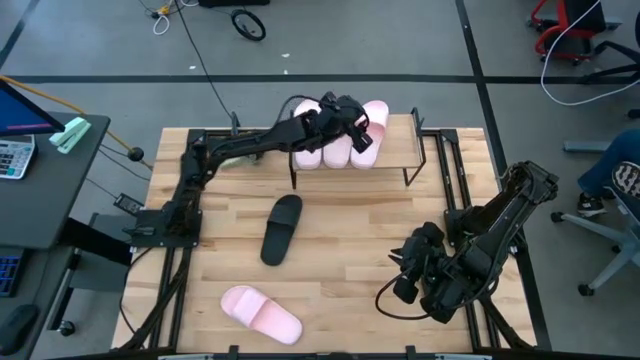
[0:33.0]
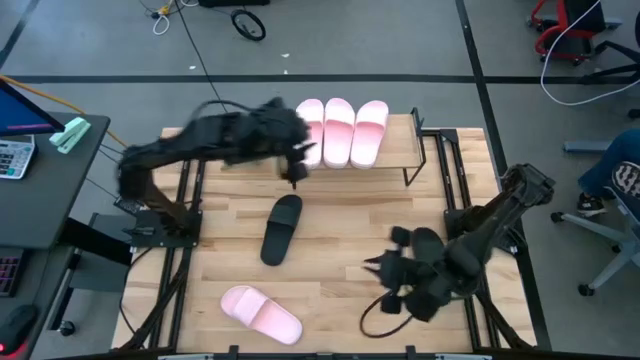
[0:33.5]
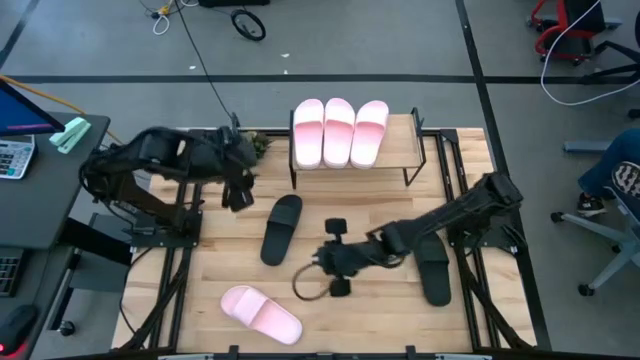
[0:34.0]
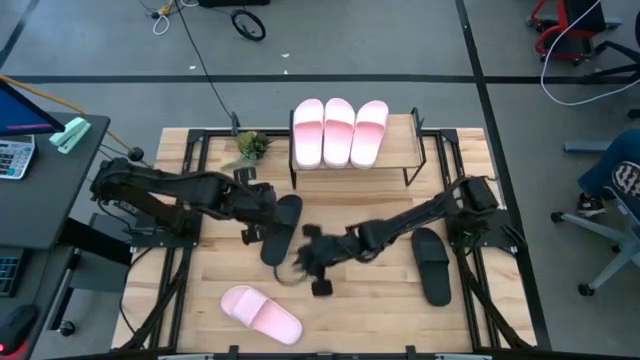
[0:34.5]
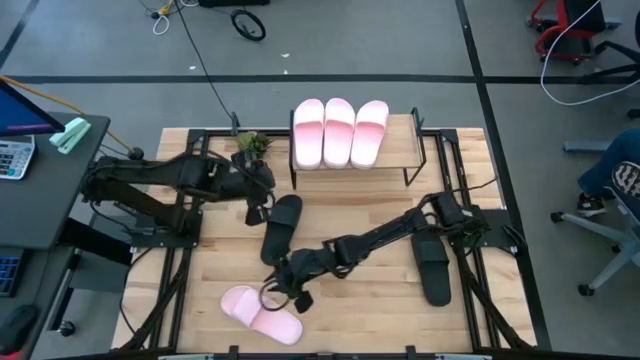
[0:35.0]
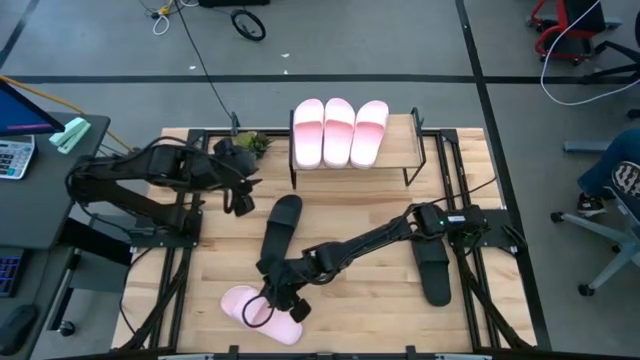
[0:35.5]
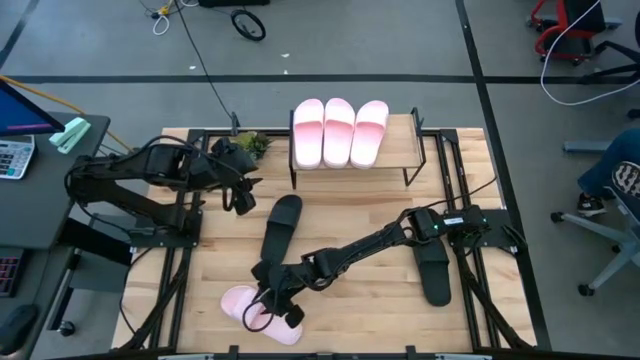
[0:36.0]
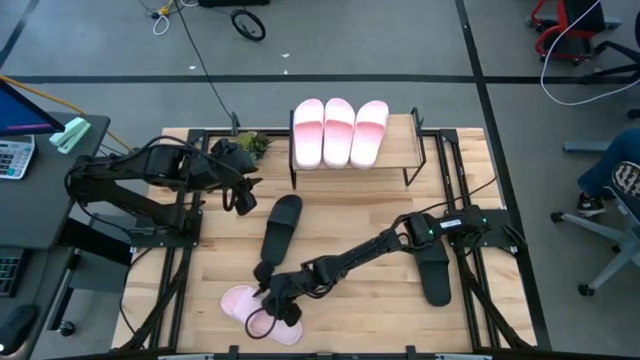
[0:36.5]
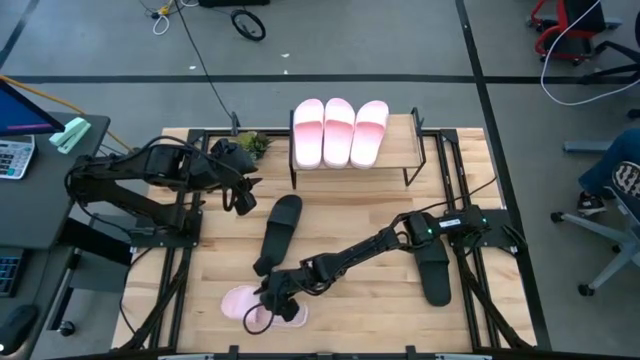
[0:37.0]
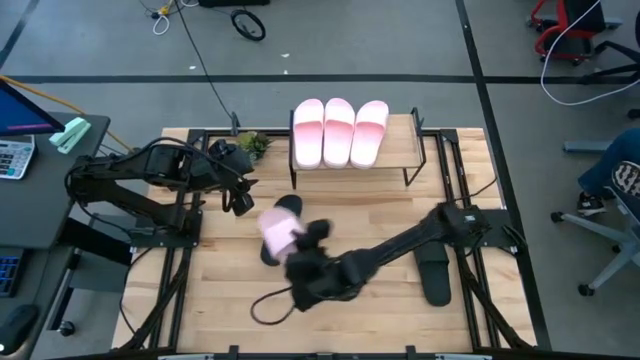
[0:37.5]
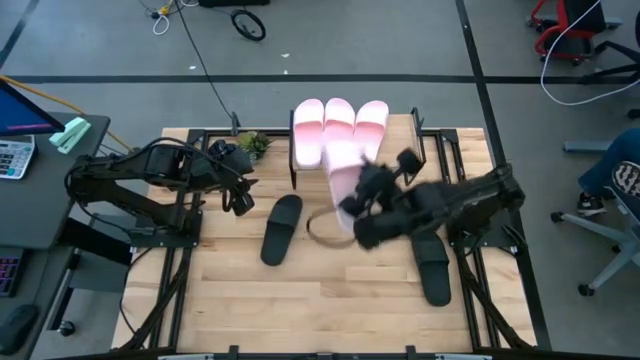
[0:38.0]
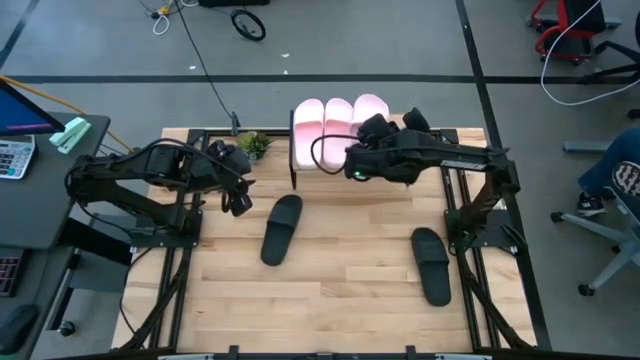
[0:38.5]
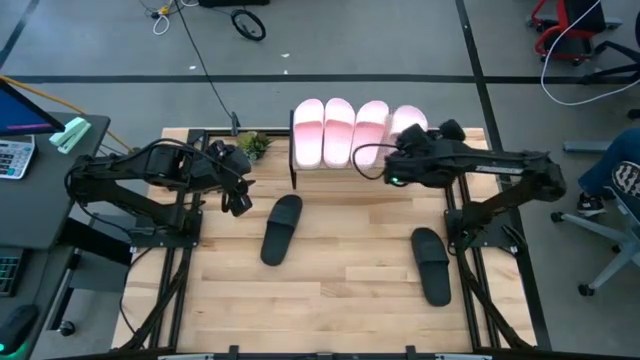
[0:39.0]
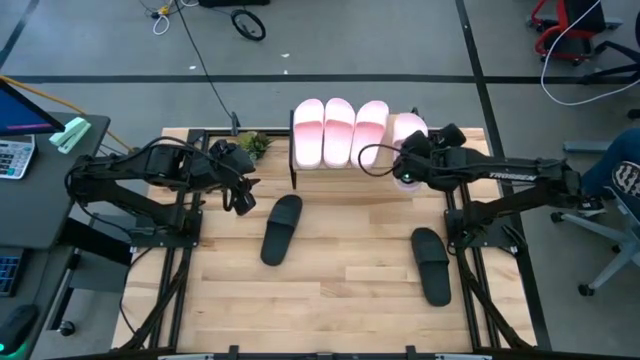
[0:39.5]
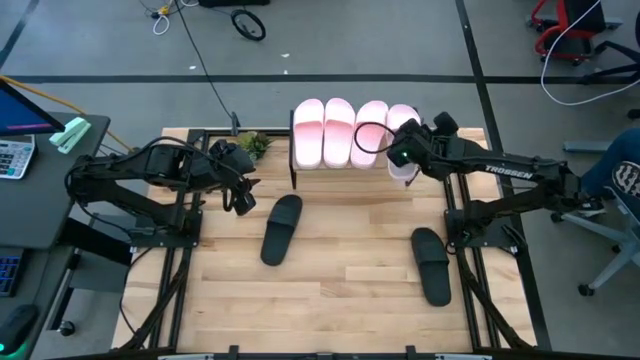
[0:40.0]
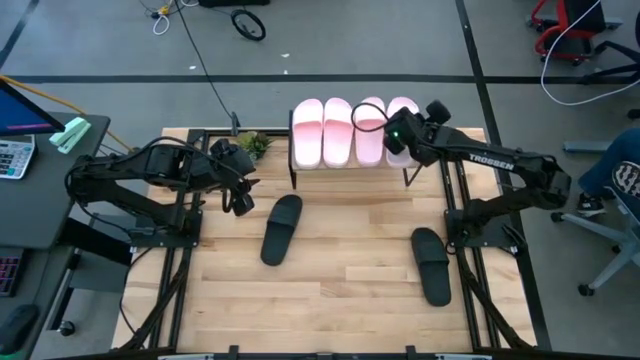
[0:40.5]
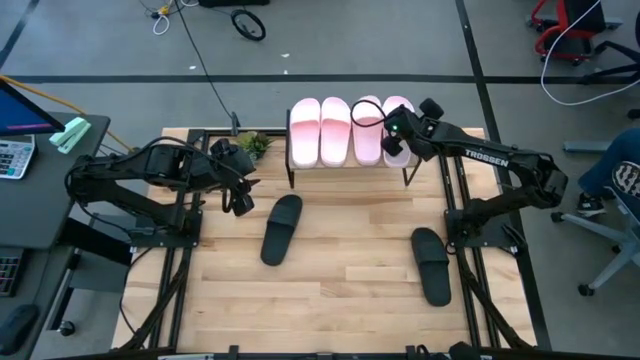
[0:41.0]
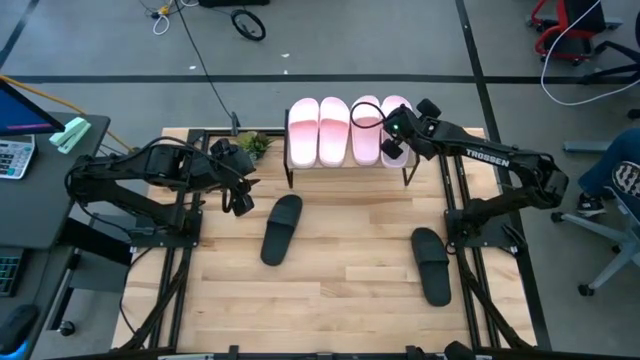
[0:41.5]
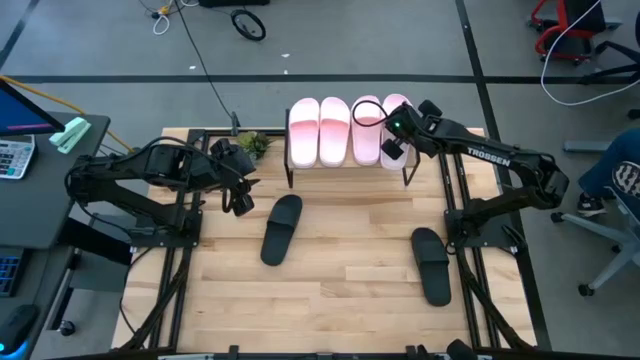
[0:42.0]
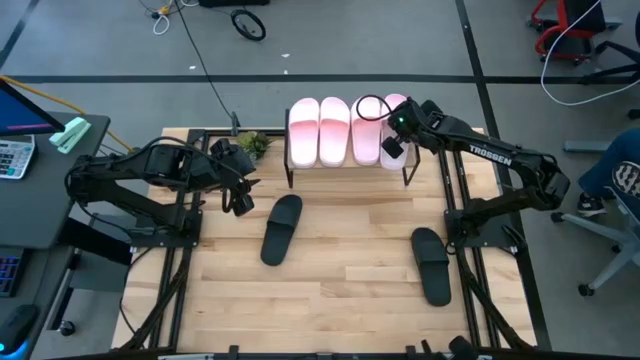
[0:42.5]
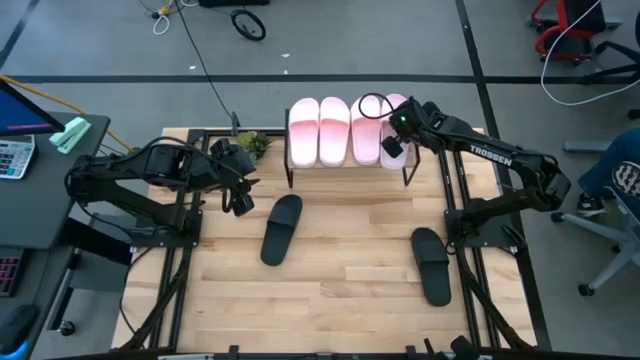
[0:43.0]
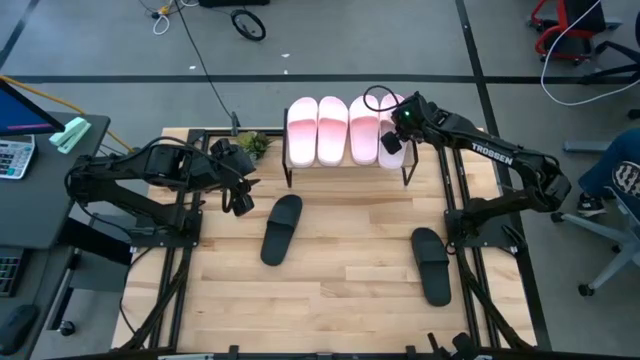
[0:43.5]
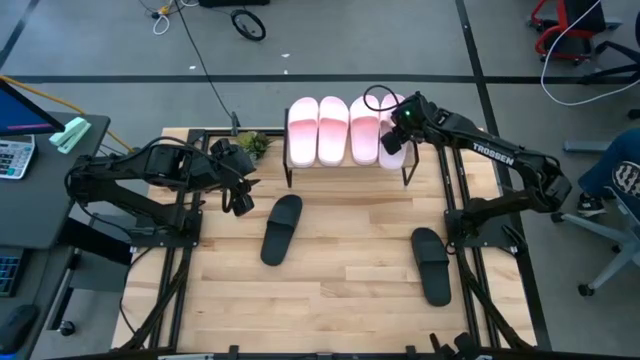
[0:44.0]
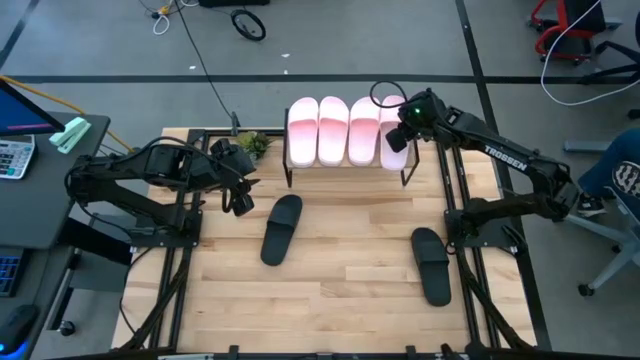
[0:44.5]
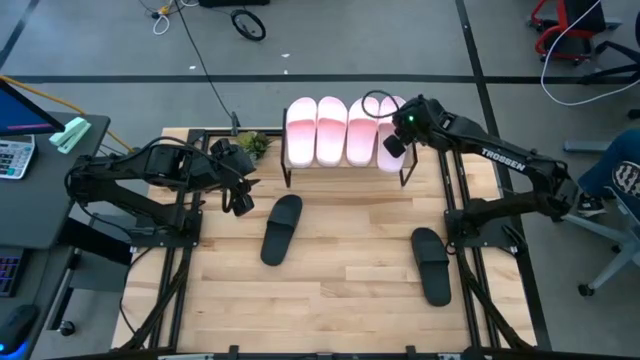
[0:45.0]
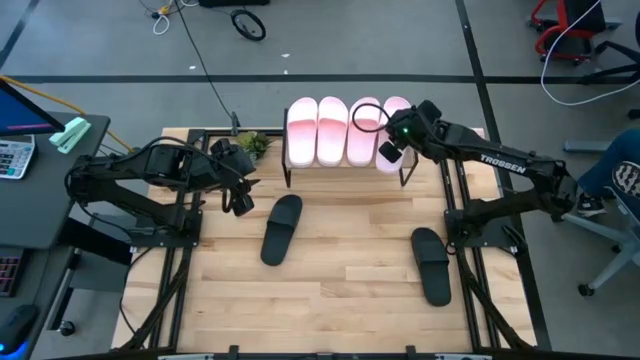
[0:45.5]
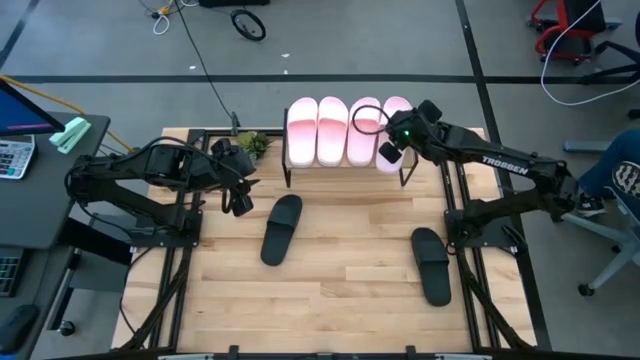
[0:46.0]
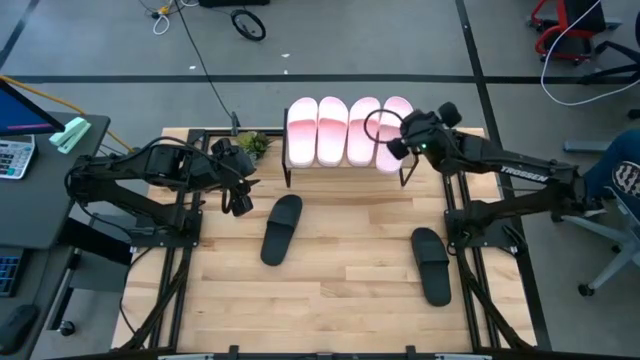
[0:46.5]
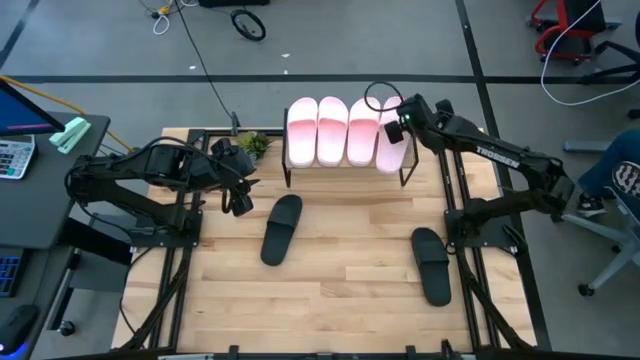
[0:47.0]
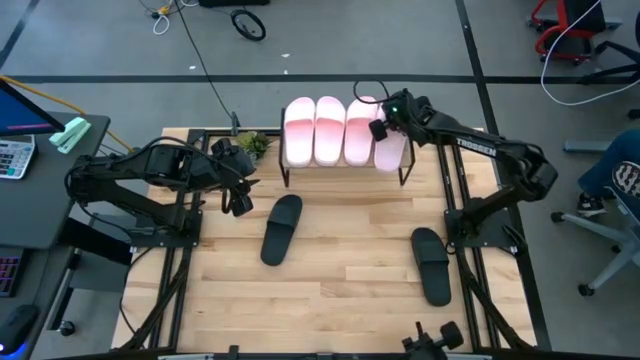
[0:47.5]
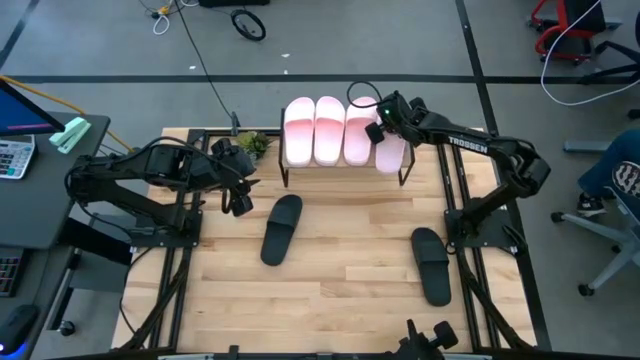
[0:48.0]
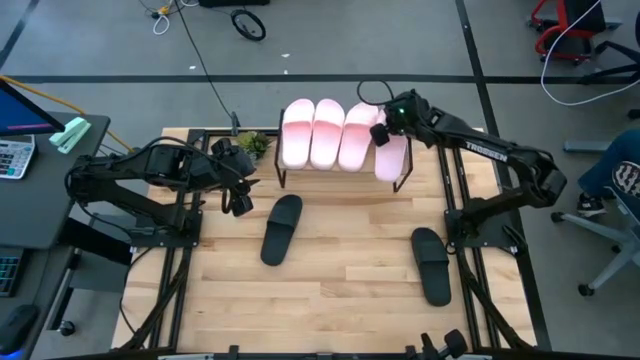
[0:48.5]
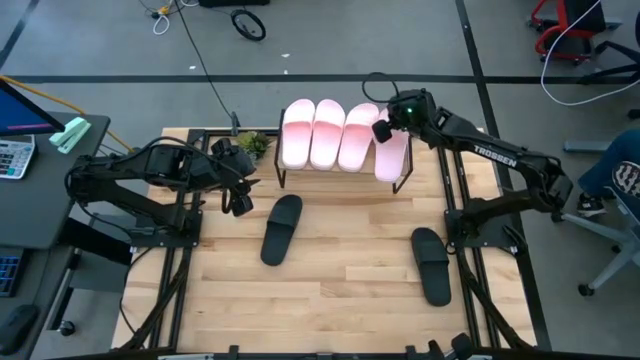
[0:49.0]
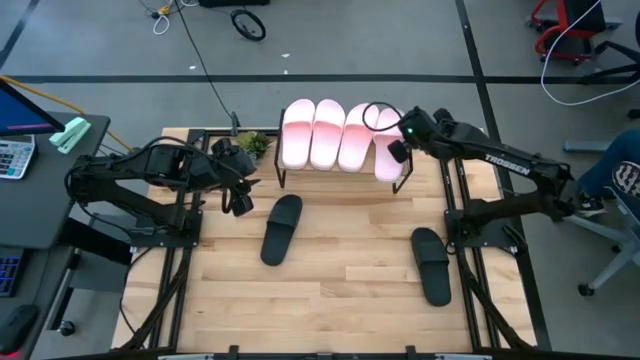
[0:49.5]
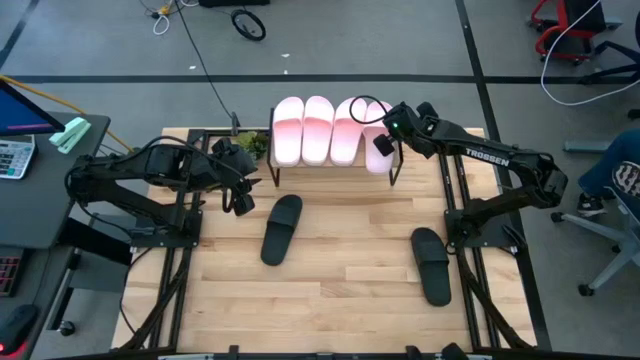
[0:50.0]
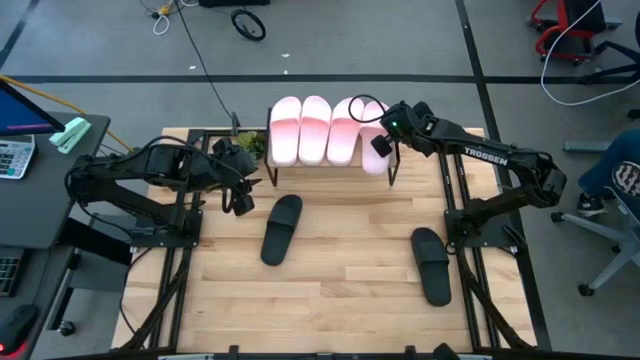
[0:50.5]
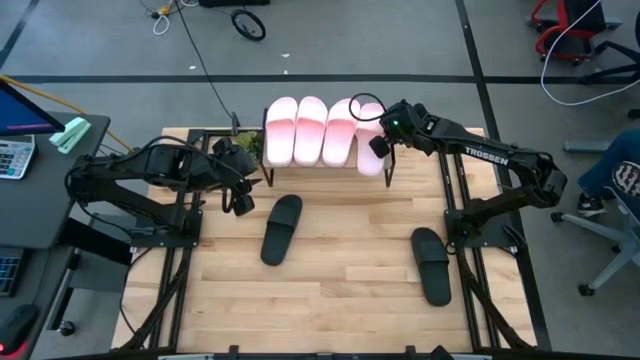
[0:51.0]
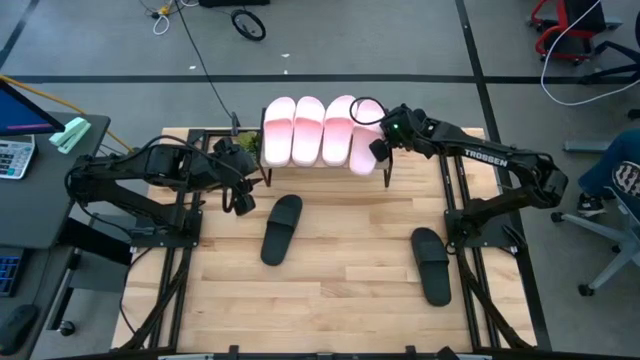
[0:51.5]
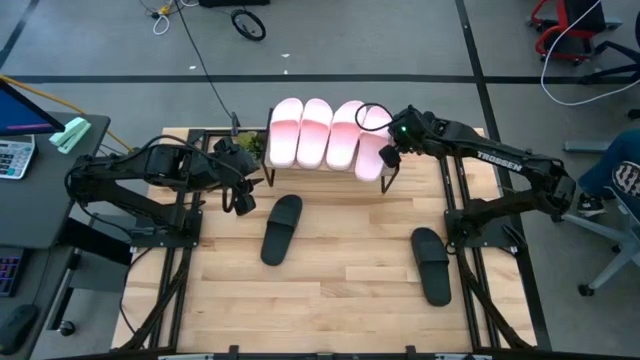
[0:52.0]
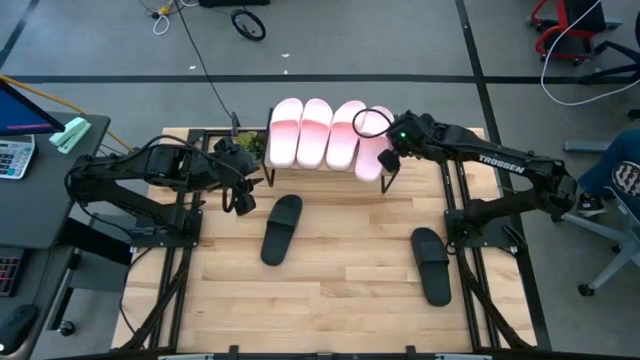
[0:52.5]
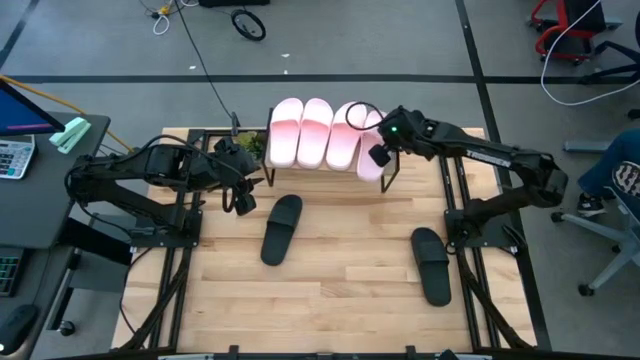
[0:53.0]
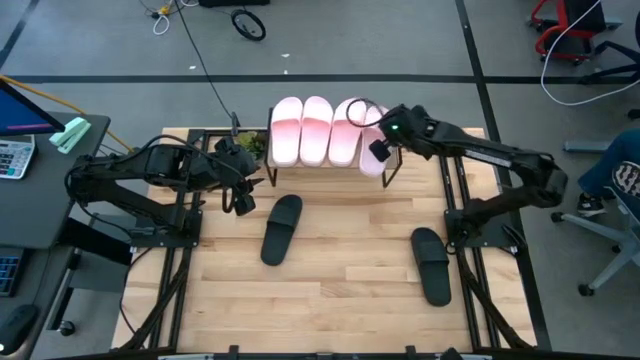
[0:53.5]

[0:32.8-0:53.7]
Task: Pick and place slides into the shelf
Put the pink slide on the shelf
